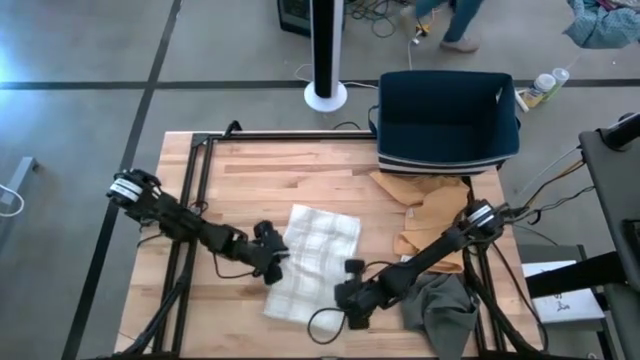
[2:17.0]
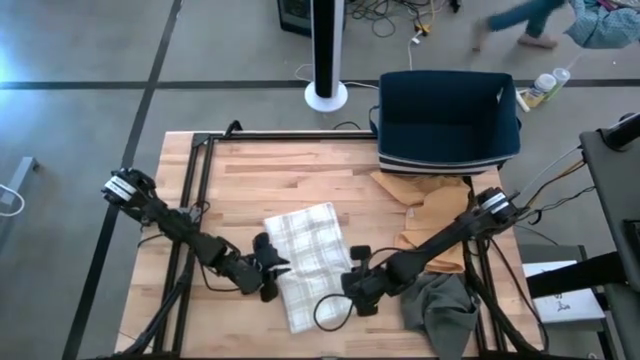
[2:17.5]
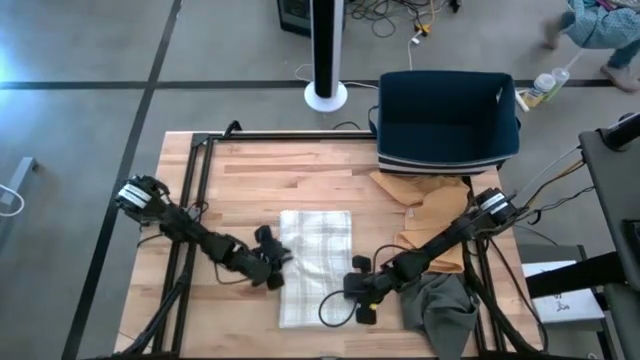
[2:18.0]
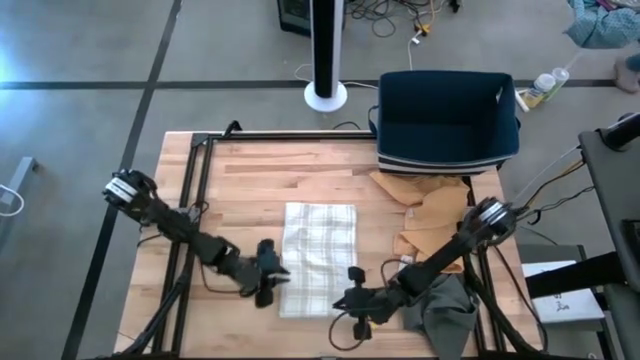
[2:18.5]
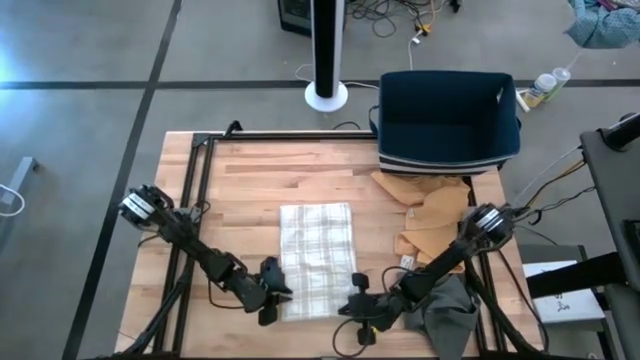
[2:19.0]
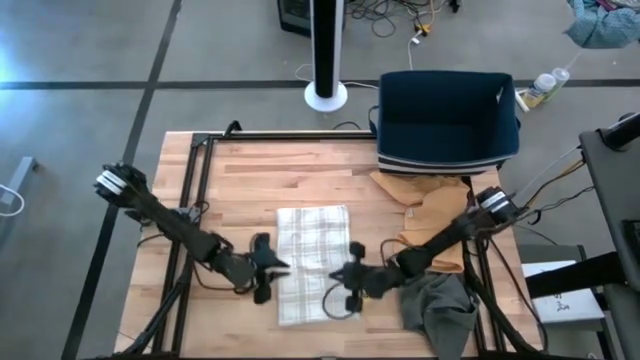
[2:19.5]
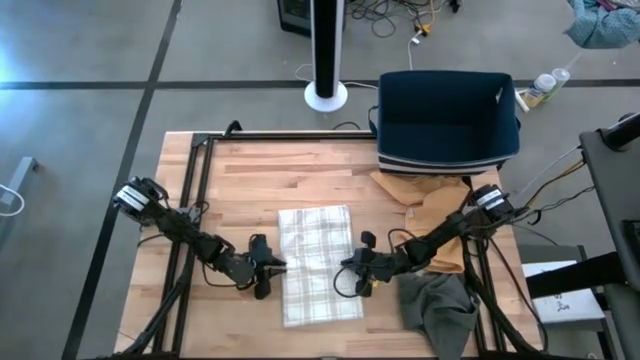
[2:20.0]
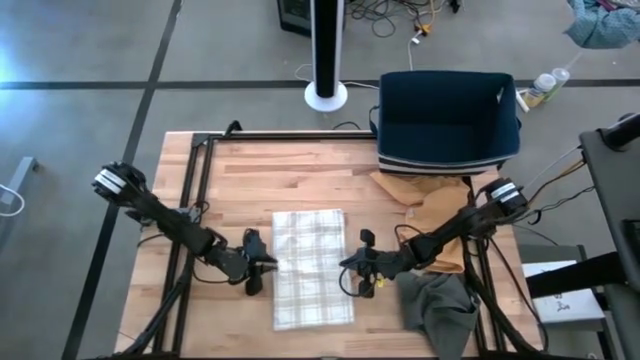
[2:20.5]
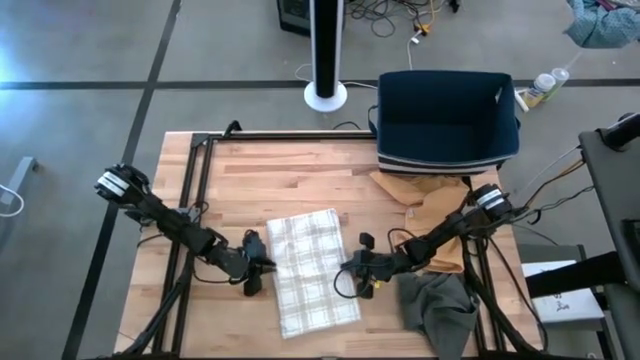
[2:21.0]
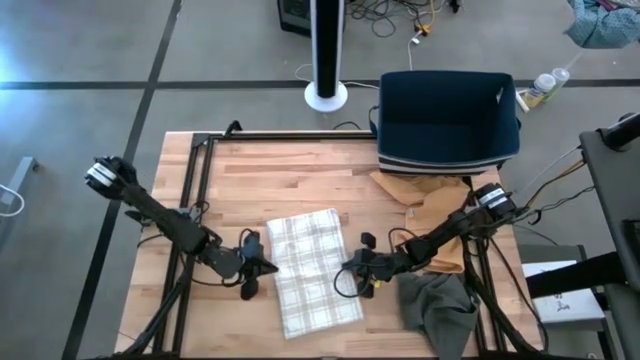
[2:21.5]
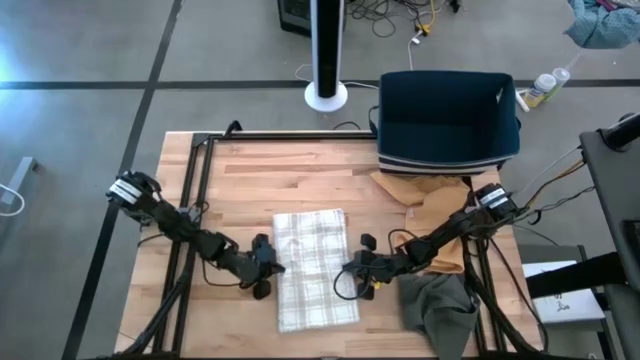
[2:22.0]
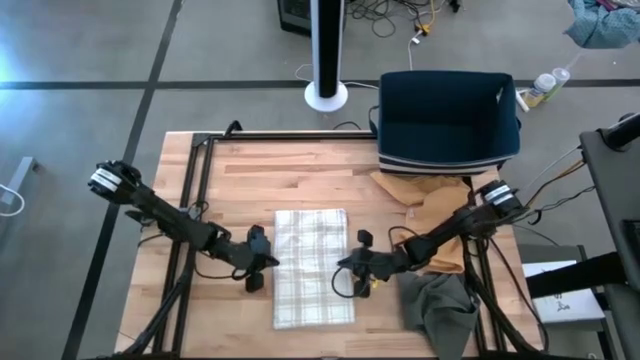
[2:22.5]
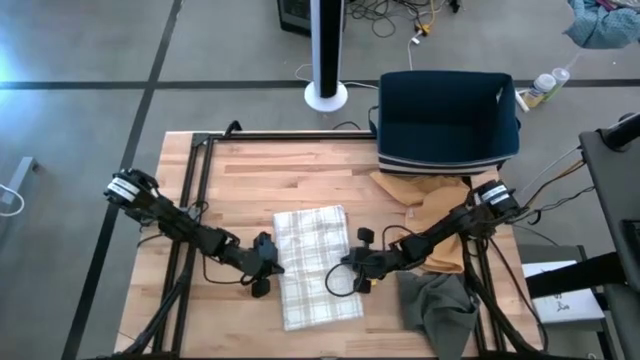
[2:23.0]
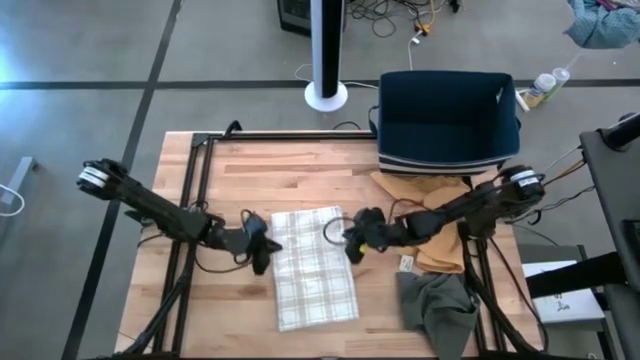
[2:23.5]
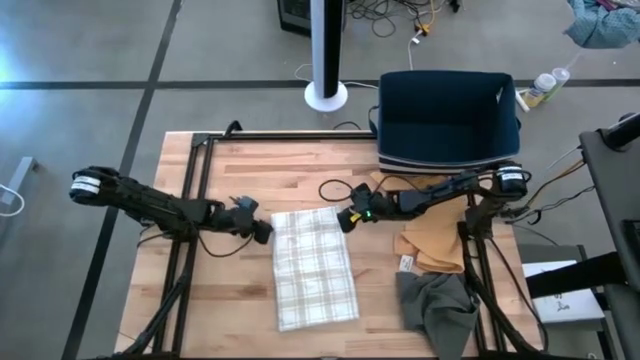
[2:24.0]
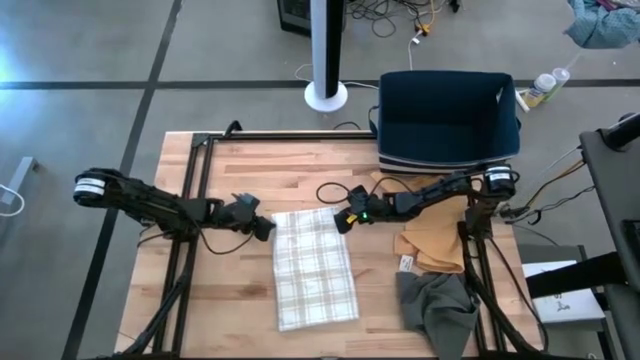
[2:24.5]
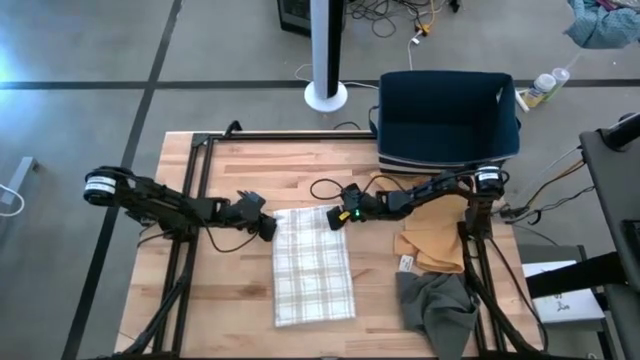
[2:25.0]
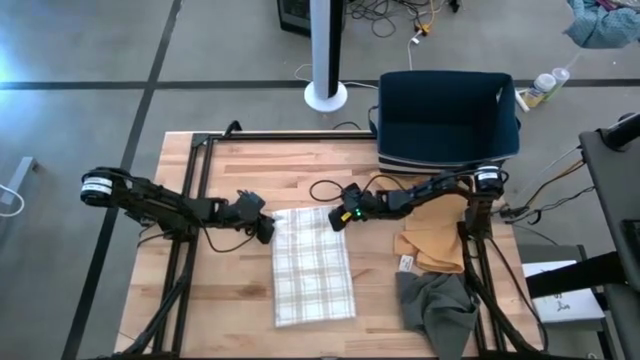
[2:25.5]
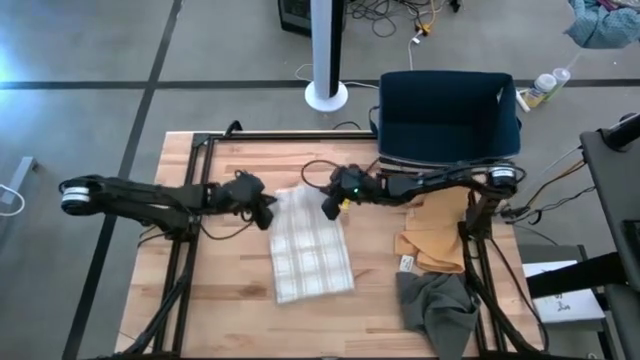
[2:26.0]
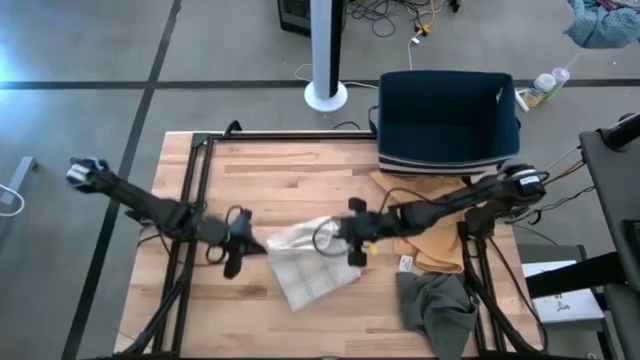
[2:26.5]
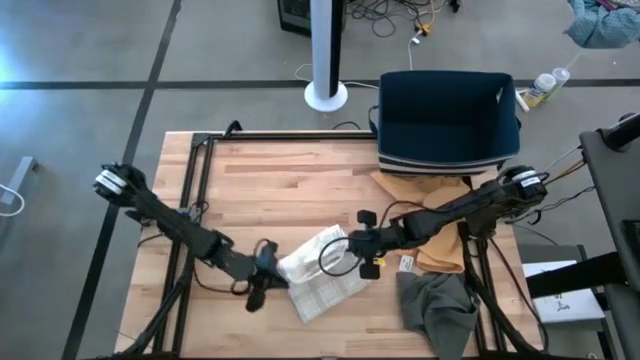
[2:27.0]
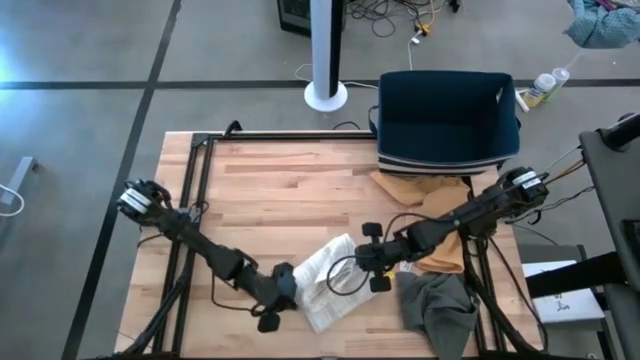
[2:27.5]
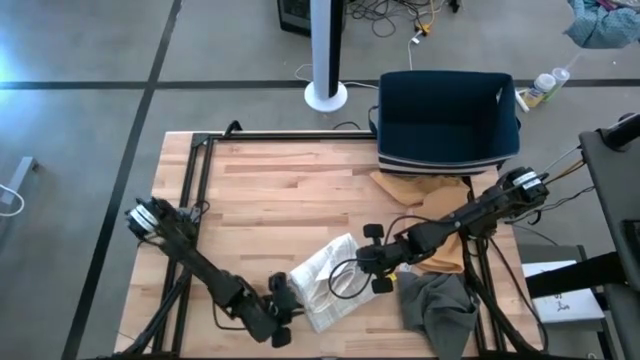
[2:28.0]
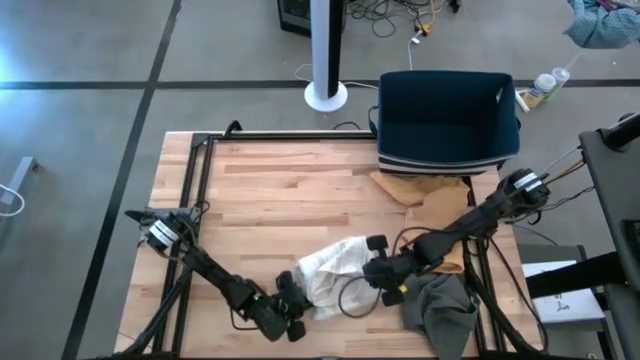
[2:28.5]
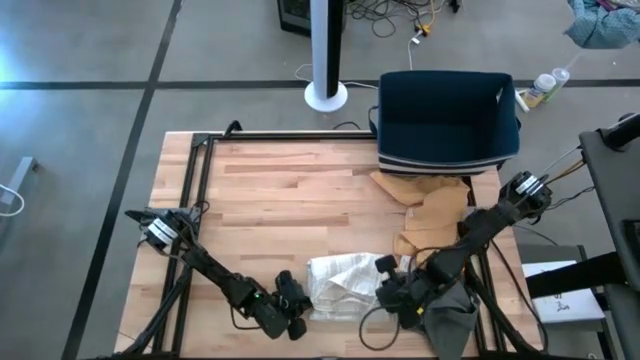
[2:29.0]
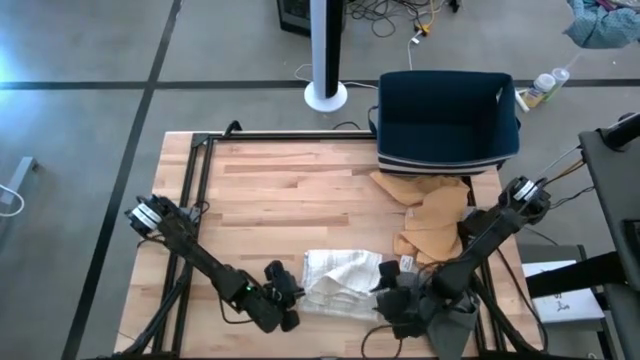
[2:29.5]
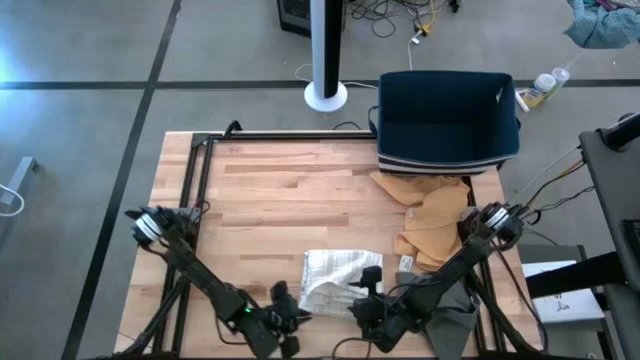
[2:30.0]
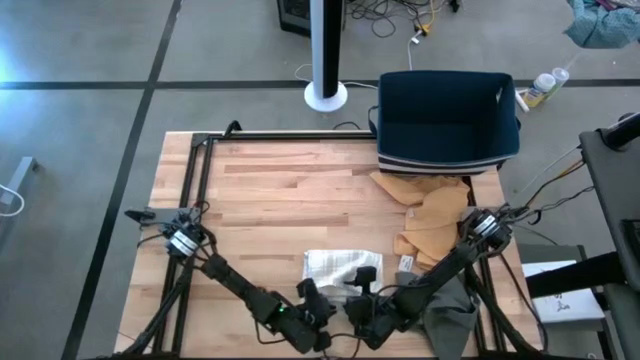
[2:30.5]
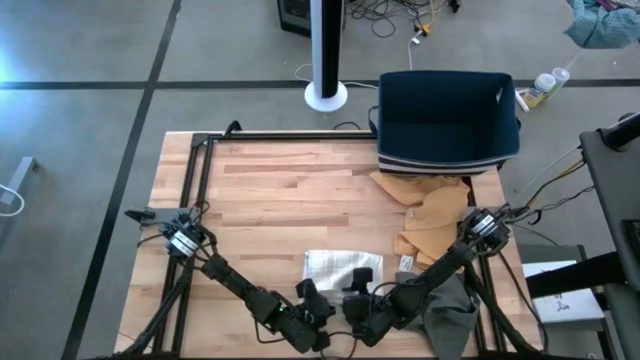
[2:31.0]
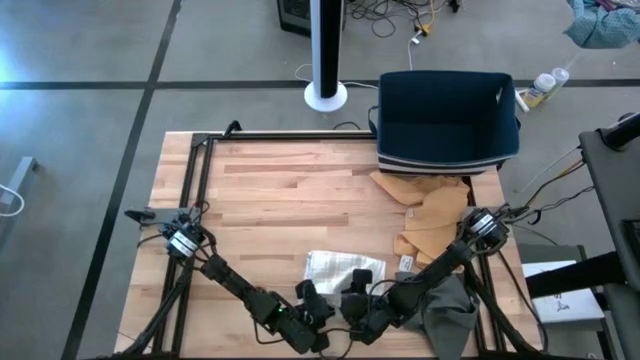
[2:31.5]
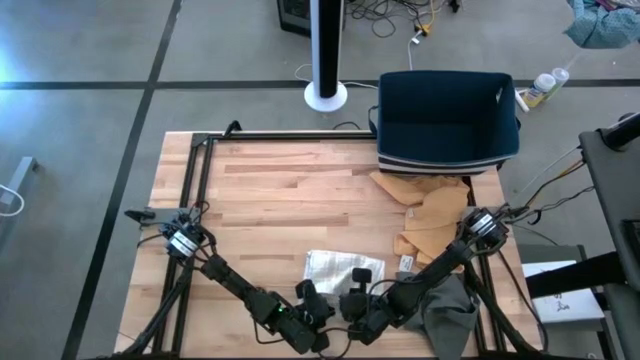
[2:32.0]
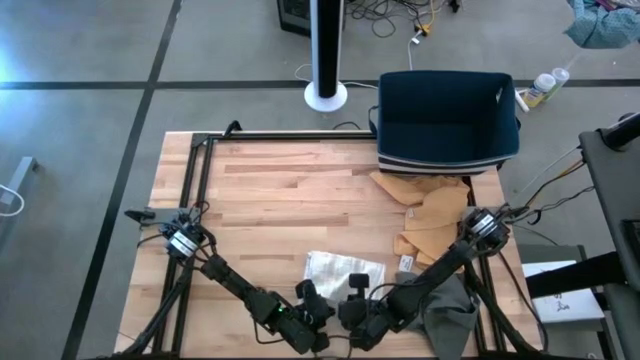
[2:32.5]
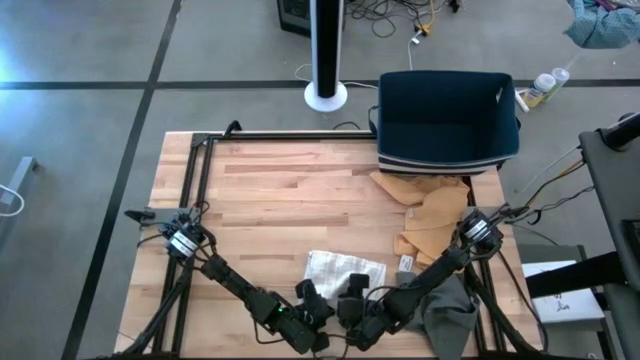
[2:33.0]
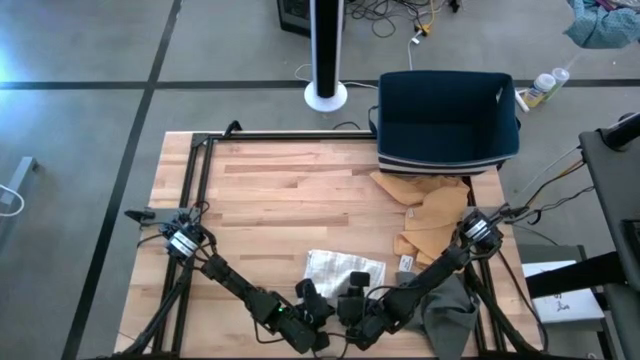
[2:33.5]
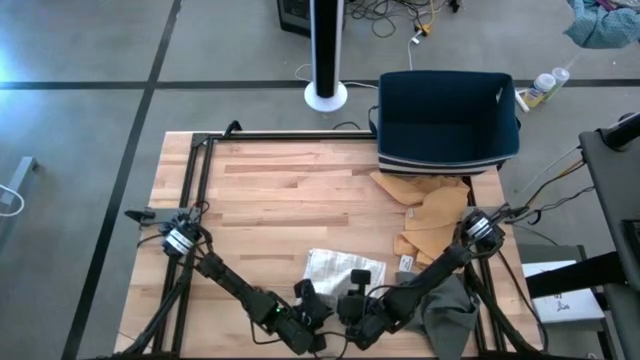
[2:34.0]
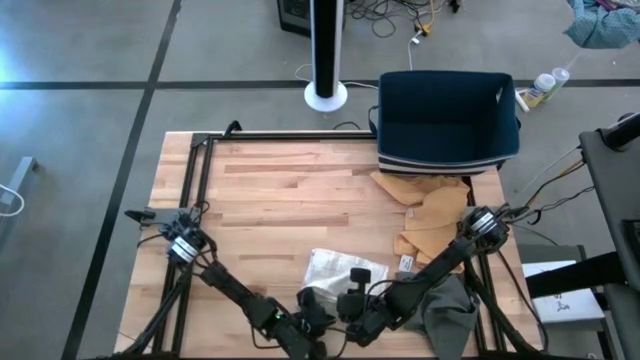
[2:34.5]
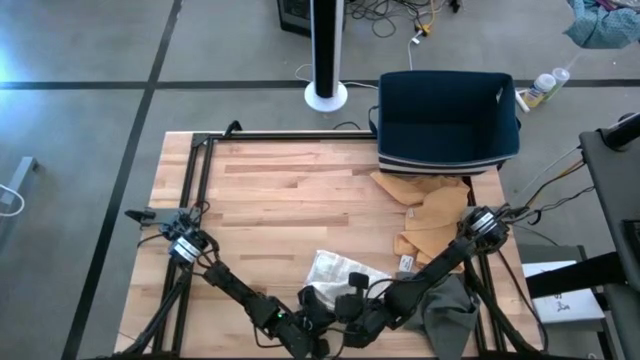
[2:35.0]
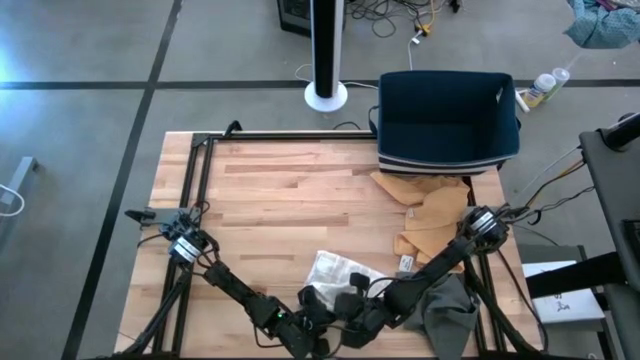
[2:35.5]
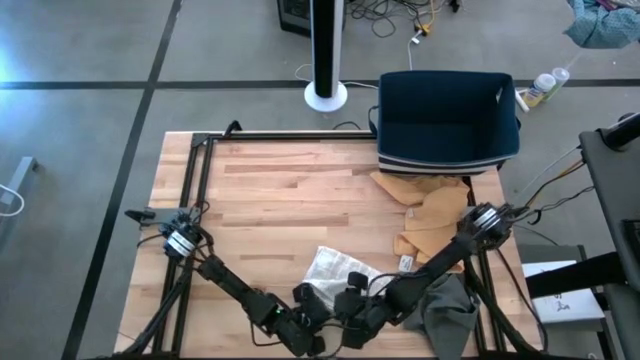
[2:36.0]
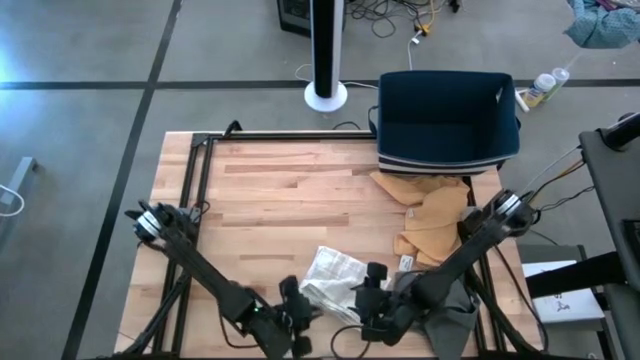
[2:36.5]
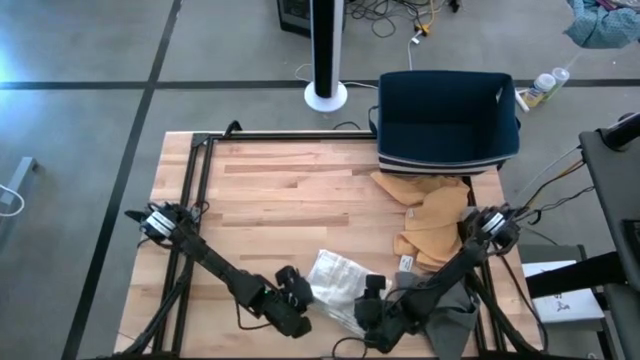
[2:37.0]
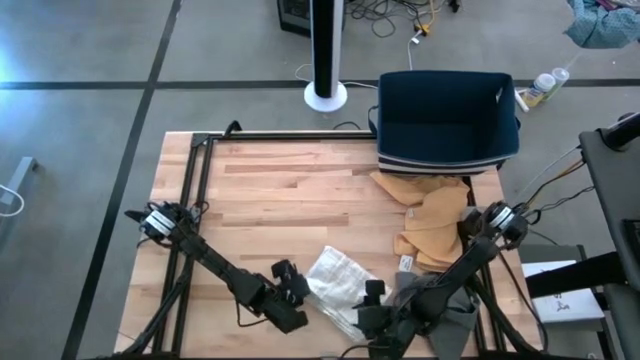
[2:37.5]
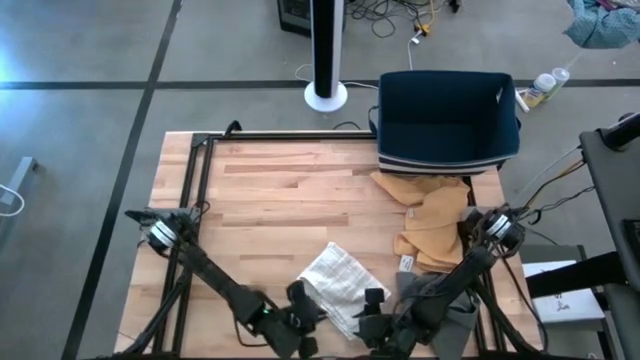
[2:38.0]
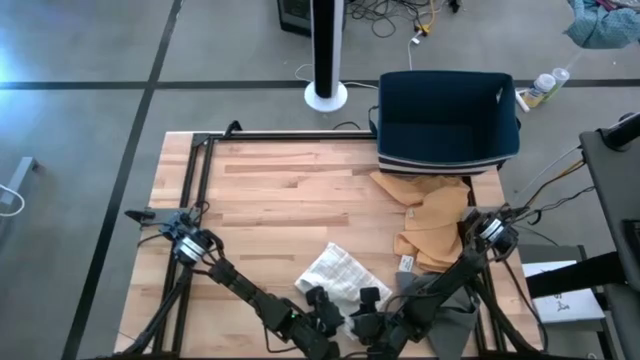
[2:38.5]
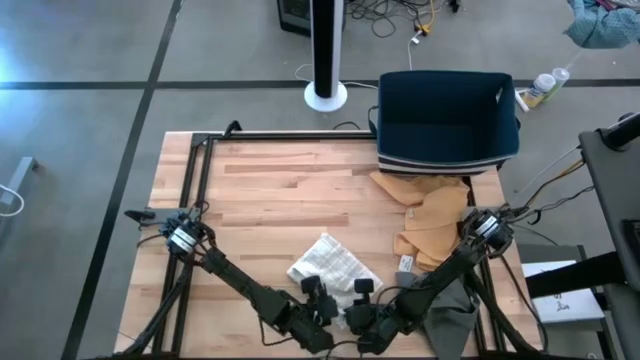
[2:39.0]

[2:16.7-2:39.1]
Task: Fold towel
Fold the white towel
